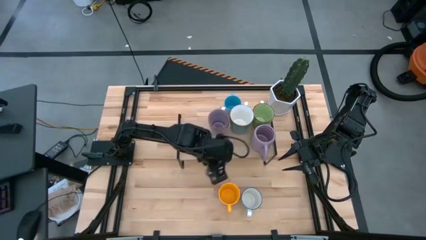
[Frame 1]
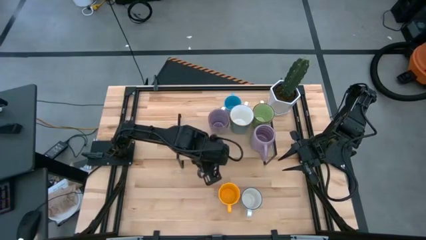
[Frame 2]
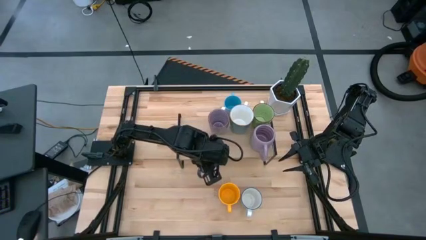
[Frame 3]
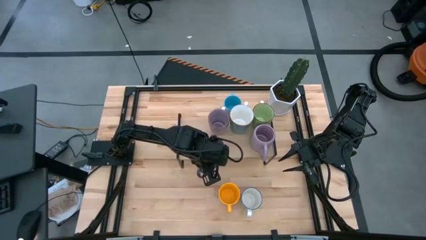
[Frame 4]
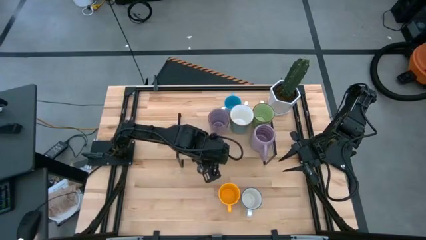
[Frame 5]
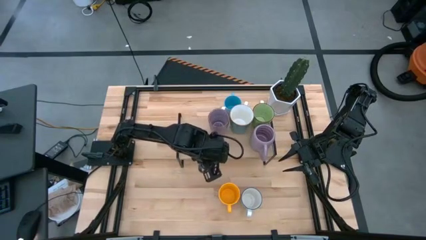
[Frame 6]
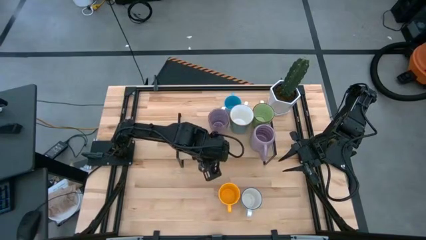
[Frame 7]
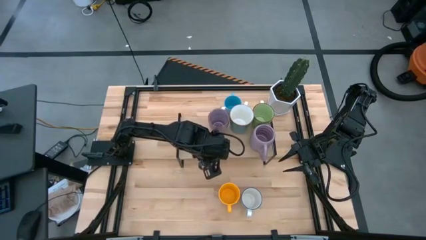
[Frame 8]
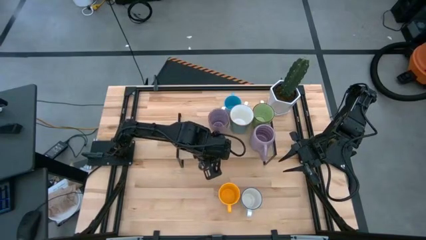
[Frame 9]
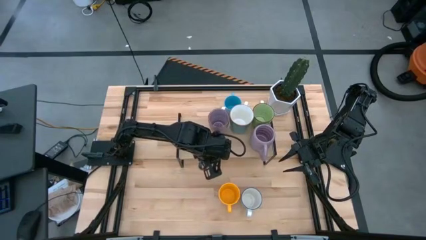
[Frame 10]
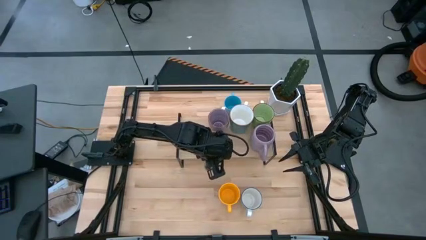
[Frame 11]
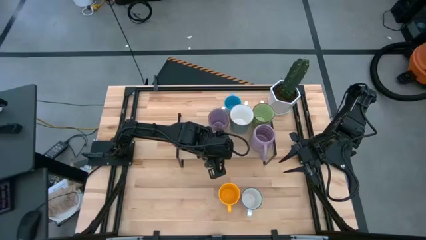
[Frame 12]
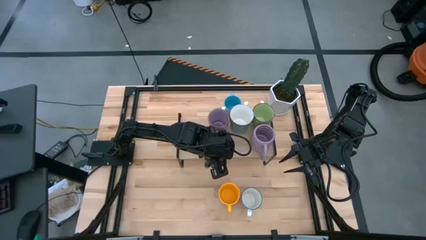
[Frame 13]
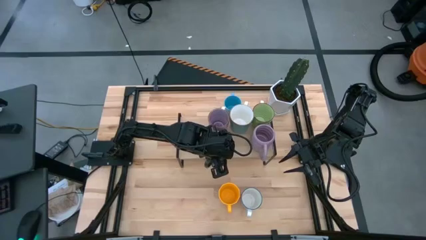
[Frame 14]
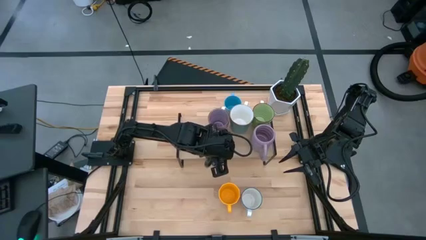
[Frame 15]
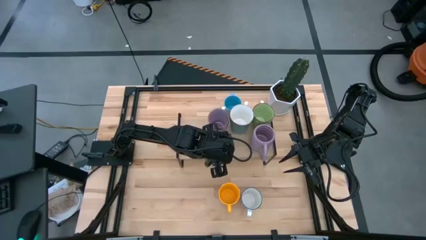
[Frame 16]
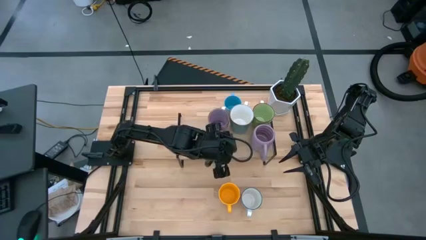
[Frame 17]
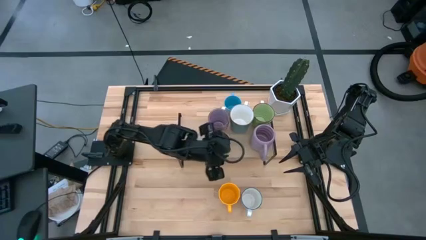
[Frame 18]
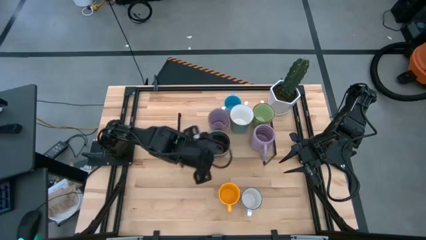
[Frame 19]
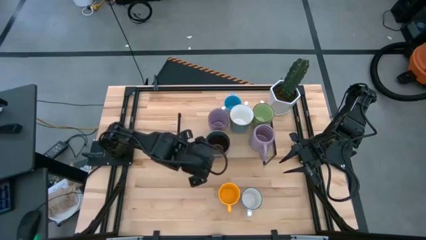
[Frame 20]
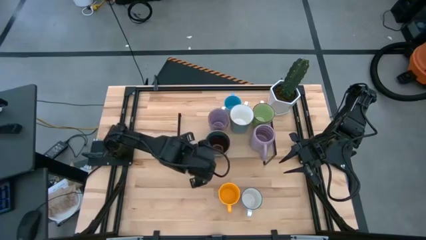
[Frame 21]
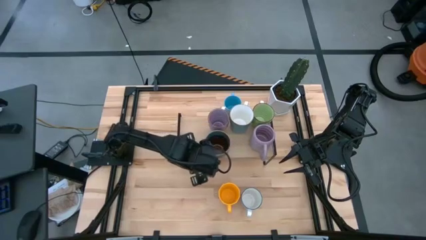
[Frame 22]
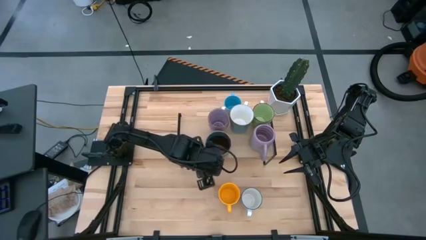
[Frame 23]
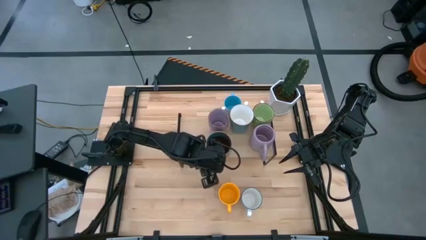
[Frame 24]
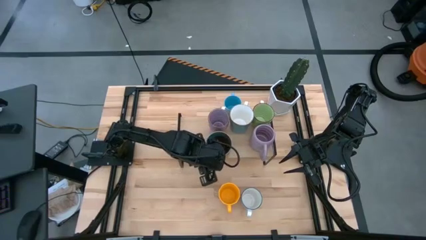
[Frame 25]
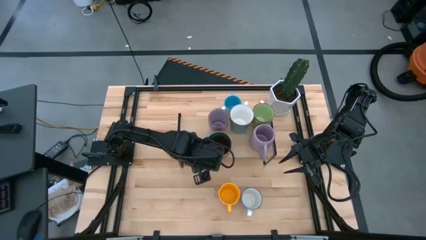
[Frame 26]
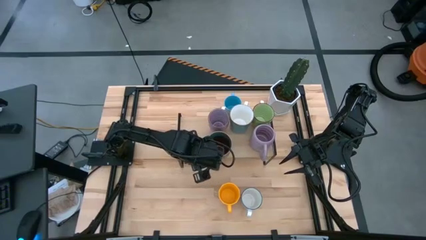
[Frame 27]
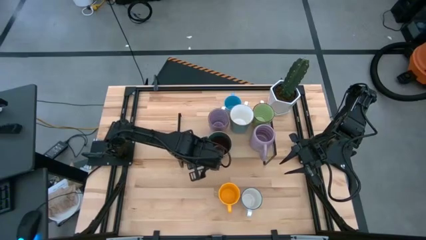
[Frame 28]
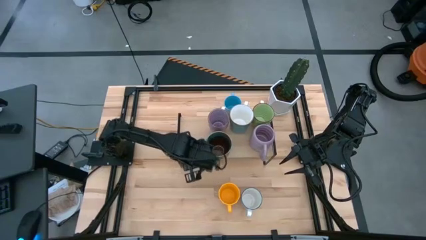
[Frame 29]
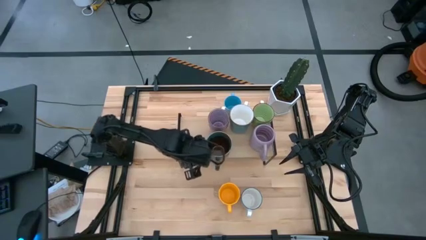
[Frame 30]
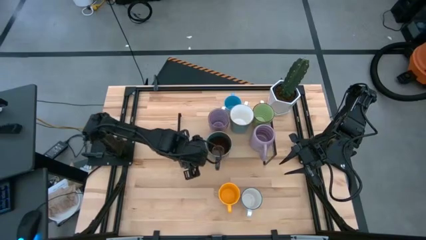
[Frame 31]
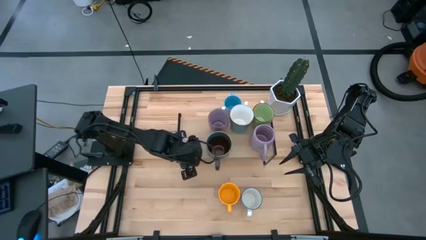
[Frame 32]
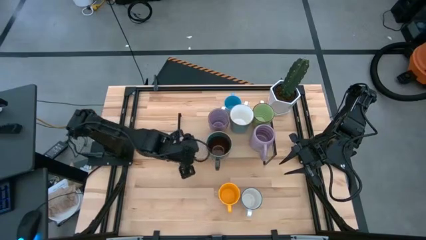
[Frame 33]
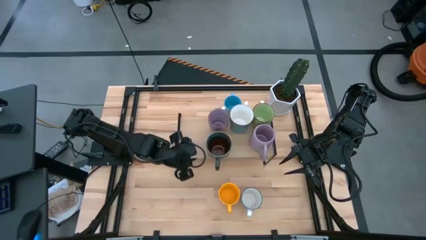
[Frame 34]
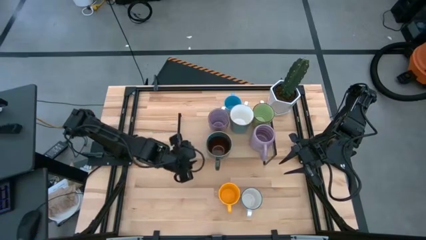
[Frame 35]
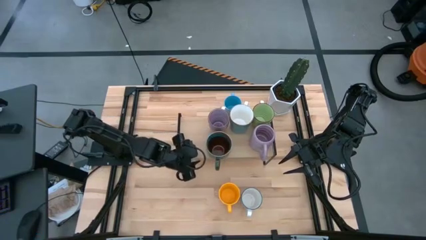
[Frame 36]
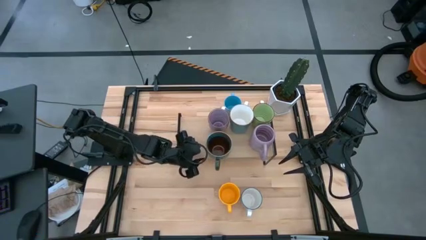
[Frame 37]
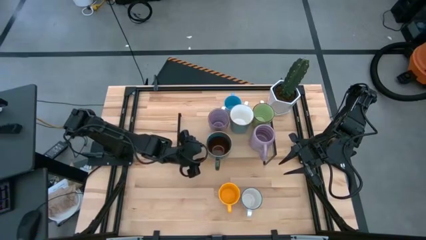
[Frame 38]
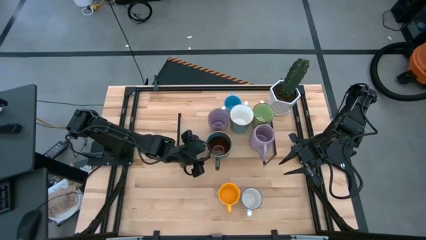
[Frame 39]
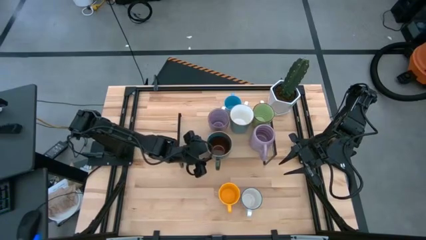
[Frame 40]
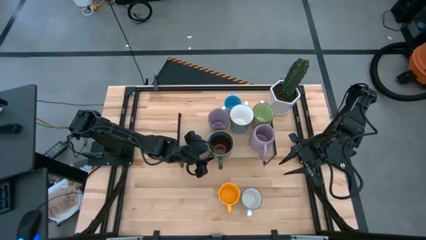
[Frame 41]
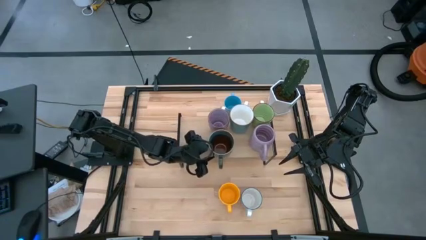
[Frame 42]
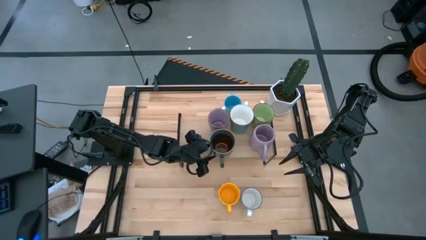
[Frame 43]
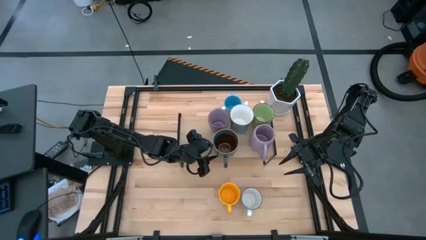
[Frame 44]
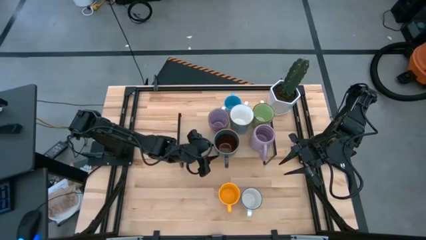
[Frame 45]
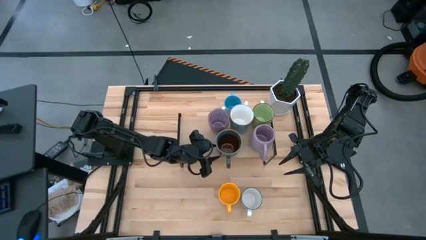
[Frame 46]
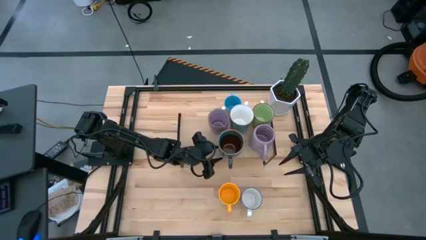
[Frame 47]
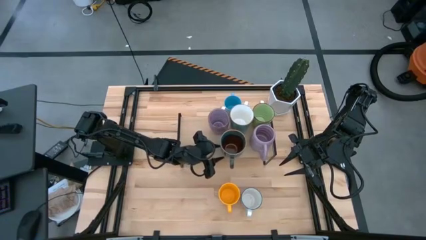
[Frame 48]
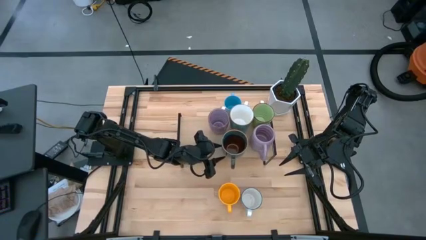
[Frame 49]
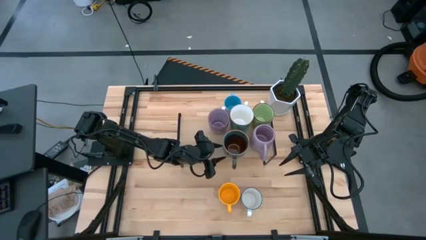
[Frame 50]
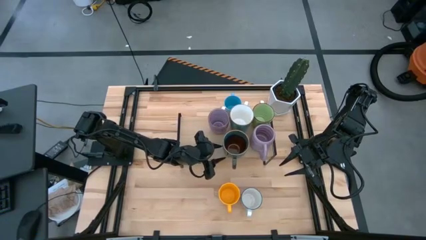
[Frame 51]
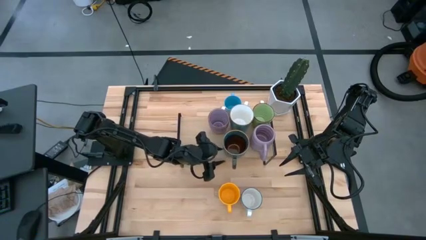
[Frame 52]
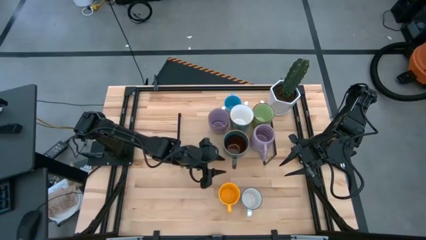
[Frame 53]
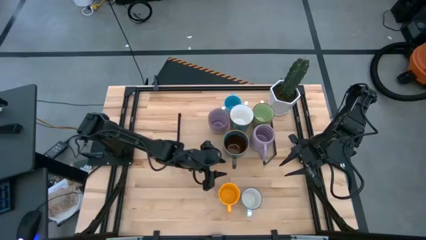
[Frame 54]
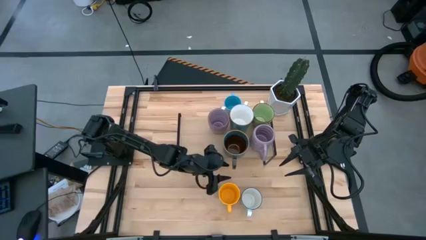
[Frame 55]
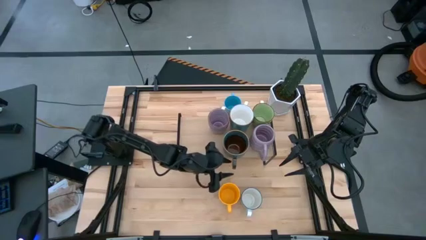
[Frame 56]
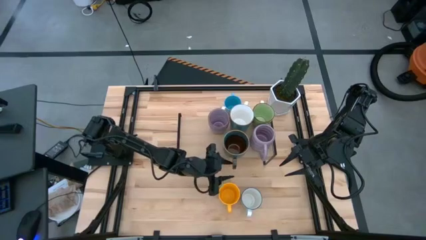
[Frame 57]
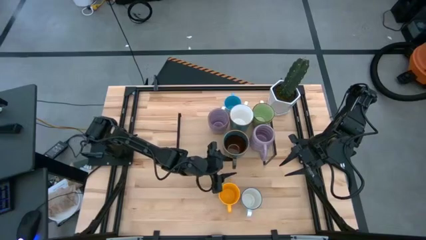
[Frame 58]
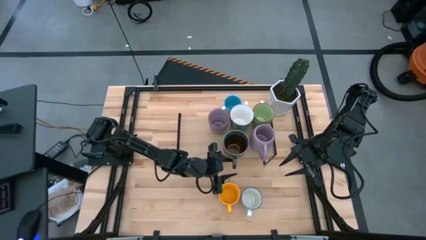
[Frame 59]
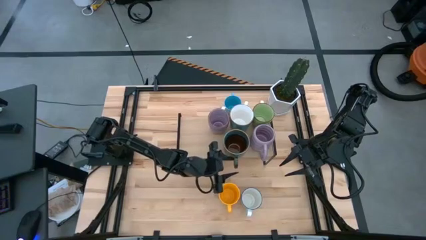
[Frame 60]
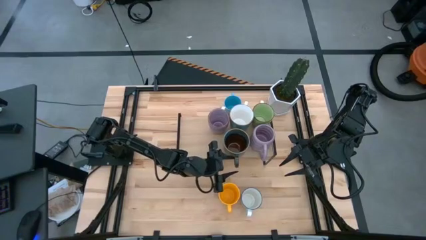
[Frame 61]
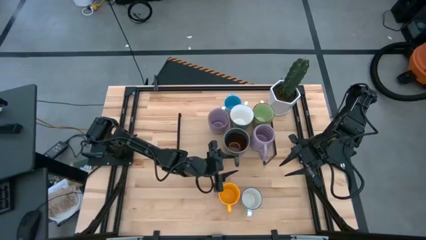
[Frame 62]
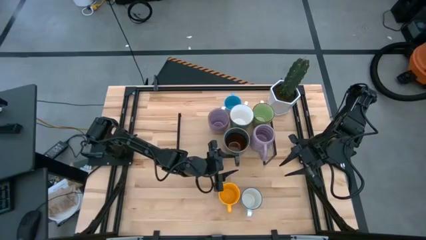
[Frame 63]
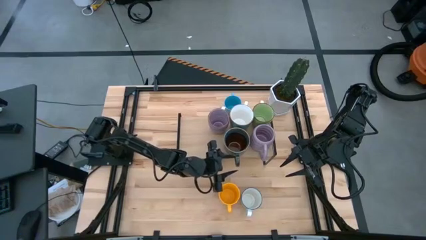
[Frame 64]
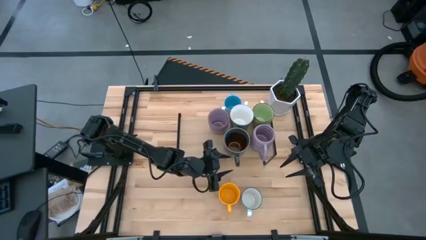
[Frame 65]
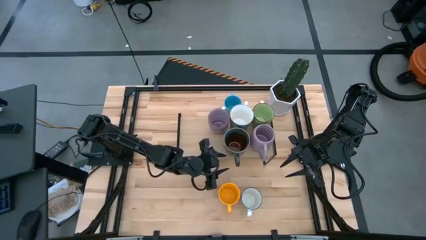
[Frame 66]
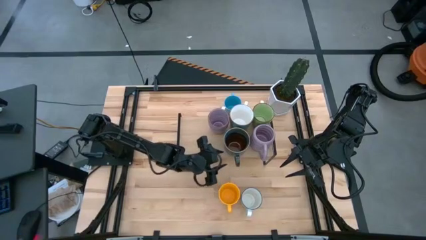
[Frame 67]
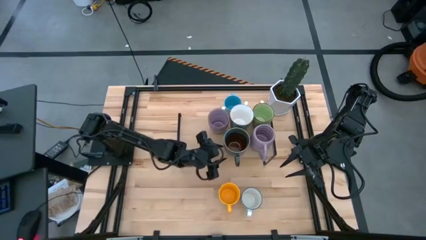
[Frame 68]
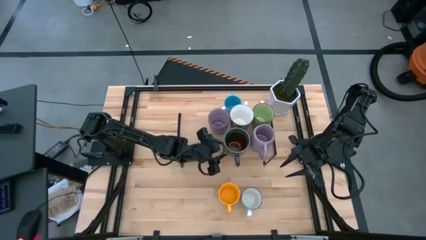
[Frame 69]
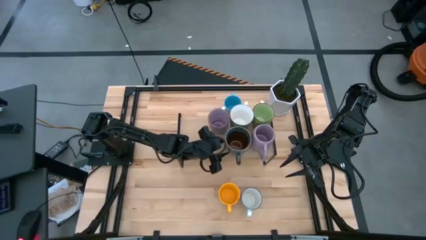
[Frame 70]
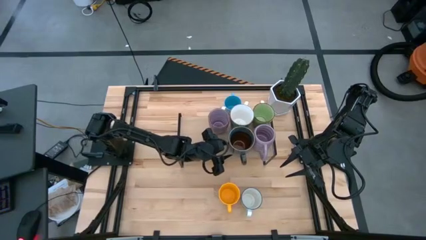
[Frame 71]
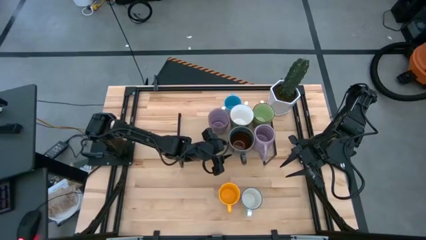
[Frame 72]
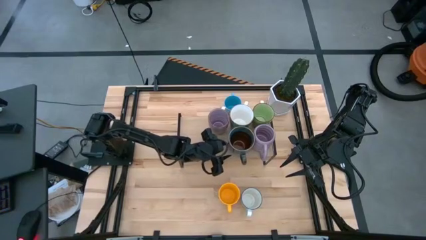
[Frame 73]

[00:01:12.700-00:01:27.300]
Task: Place coffee mugs
Put the patterned dark blue mug on the shelf

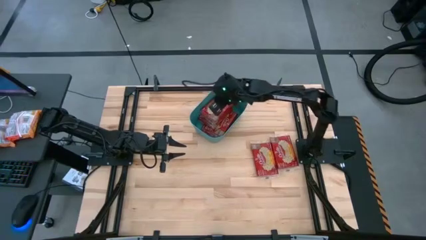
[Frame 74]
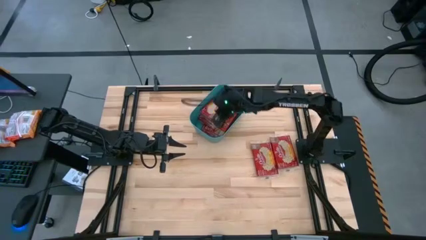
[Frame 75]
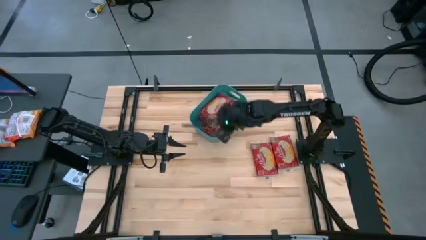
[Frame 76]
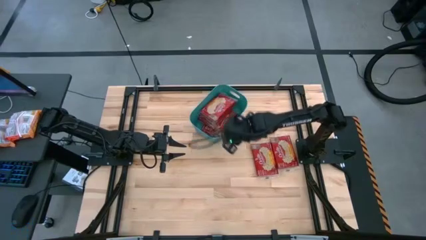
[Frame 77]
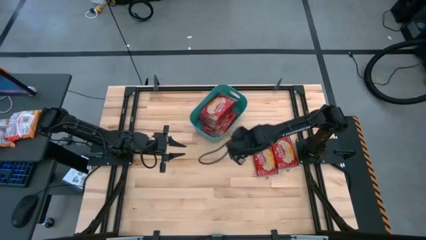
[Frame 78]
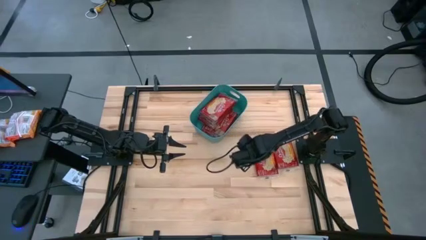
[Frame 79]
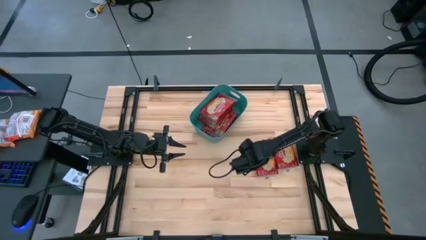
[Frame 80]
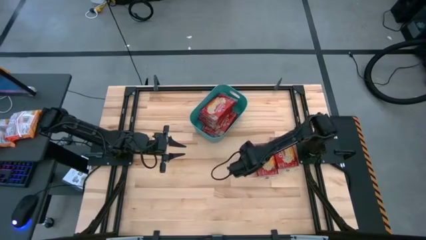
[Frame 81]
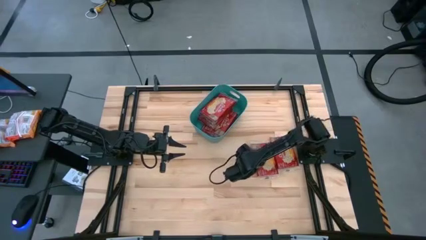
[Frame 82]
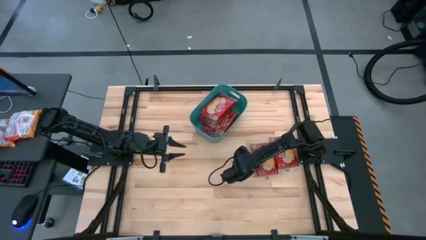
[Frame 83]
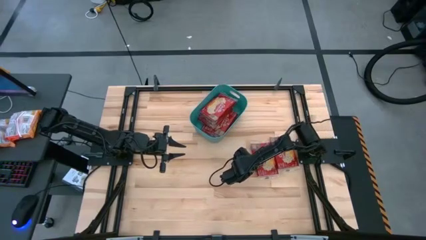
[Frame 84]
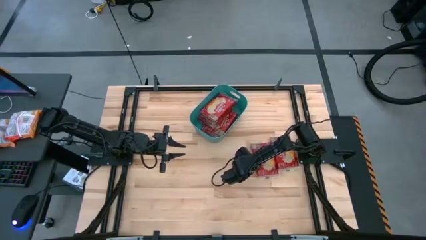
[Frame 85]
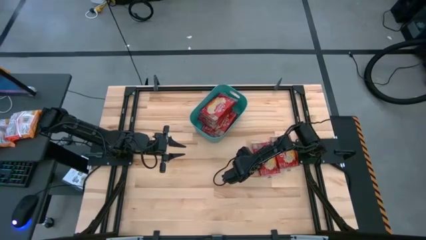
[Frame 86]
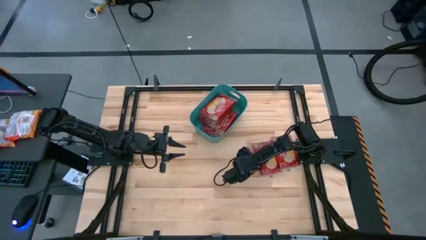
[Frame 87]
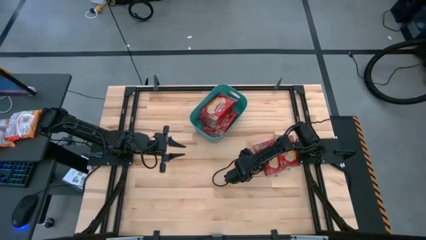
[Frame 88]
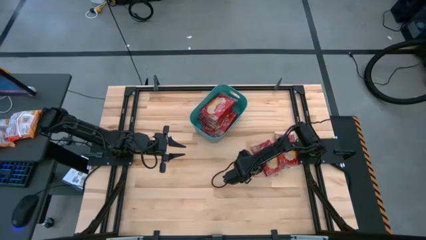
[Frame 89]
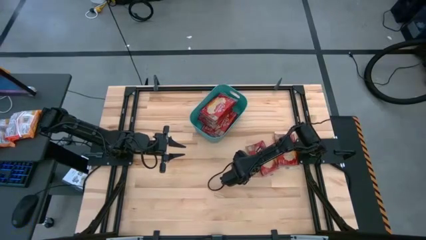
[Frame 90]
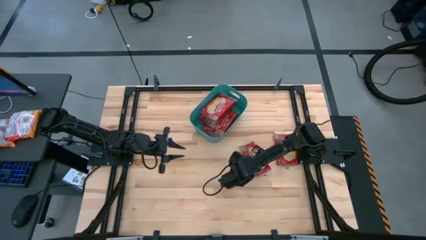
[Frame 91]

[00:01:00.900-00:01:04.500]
Task: Sort popcorn bags into baskets
Put the popcorn pack into the blue bin
